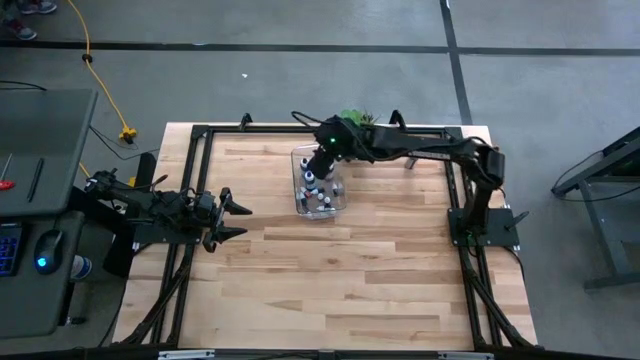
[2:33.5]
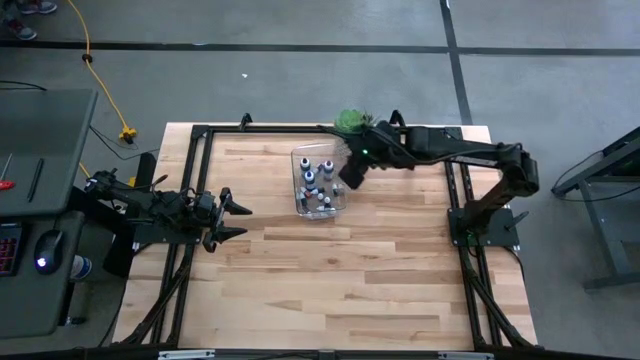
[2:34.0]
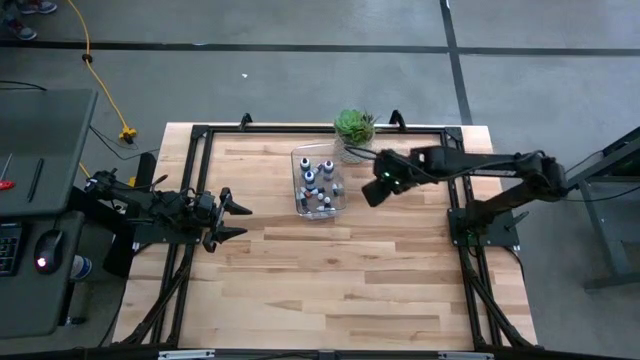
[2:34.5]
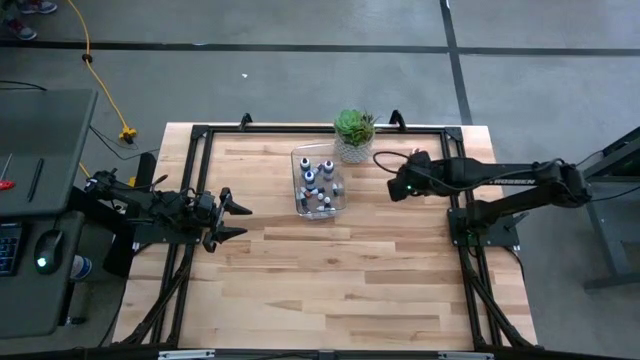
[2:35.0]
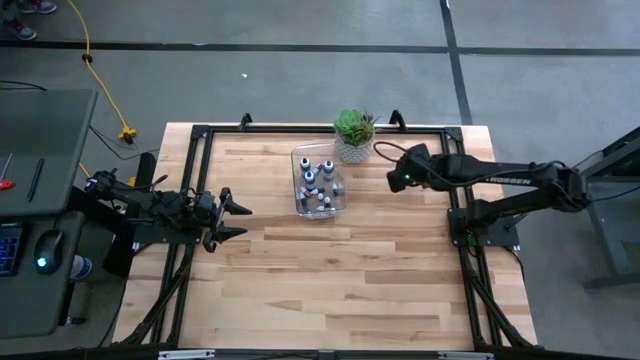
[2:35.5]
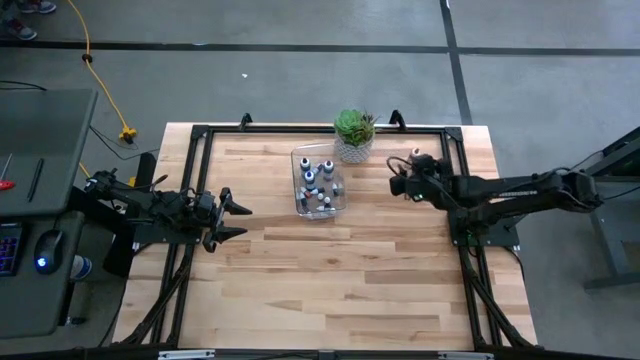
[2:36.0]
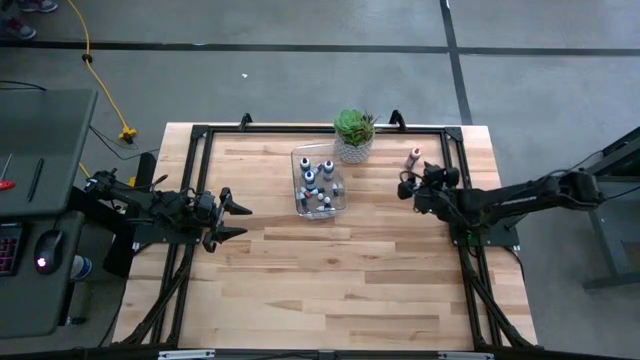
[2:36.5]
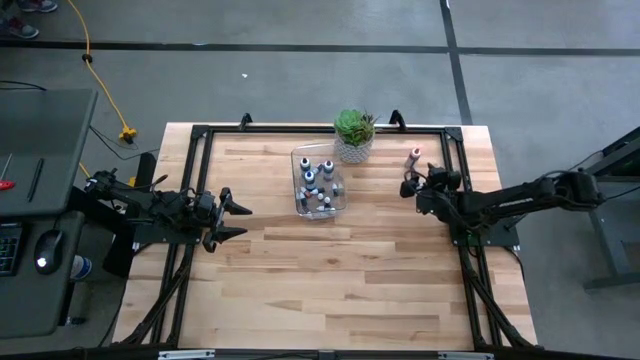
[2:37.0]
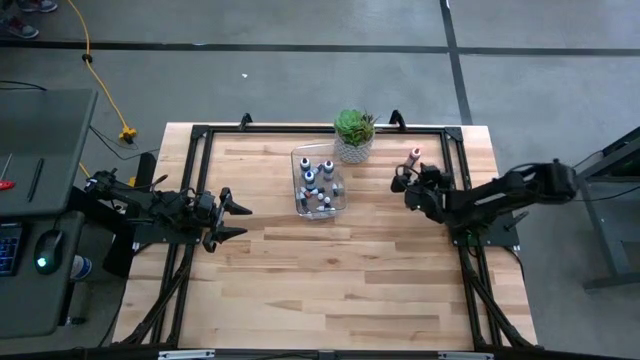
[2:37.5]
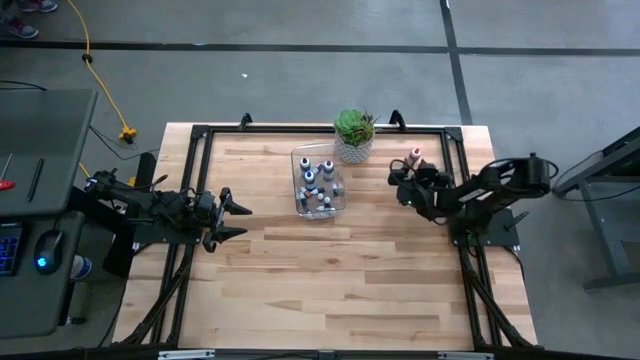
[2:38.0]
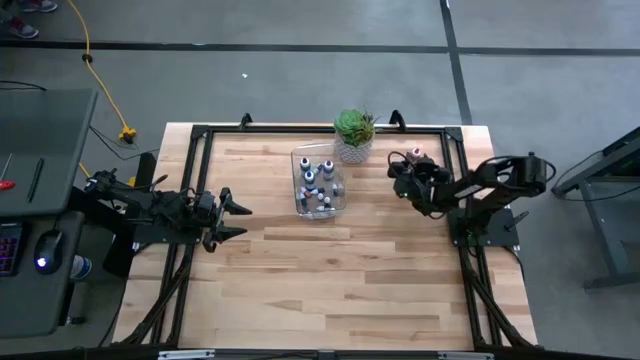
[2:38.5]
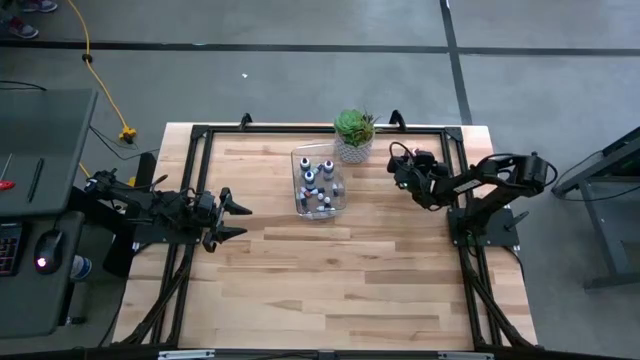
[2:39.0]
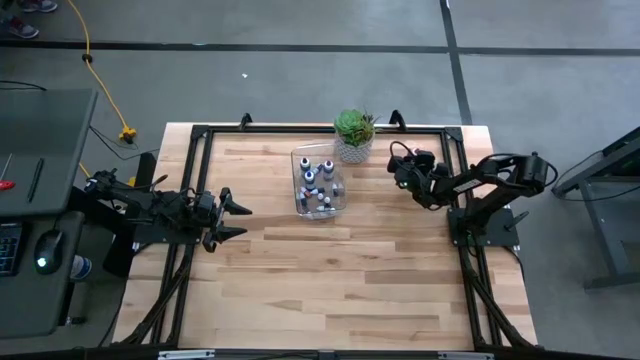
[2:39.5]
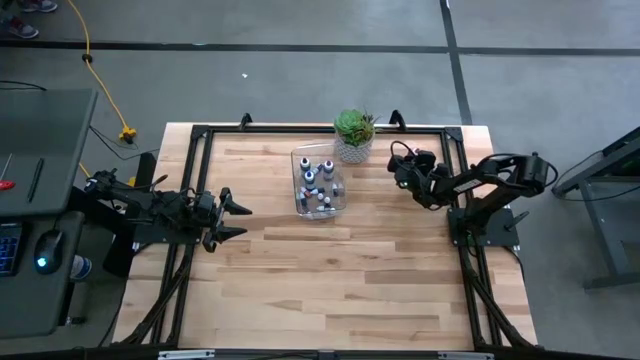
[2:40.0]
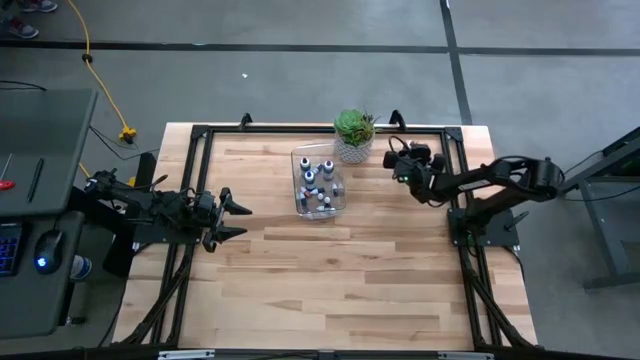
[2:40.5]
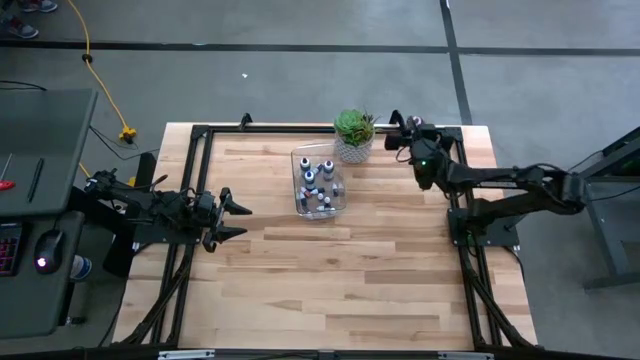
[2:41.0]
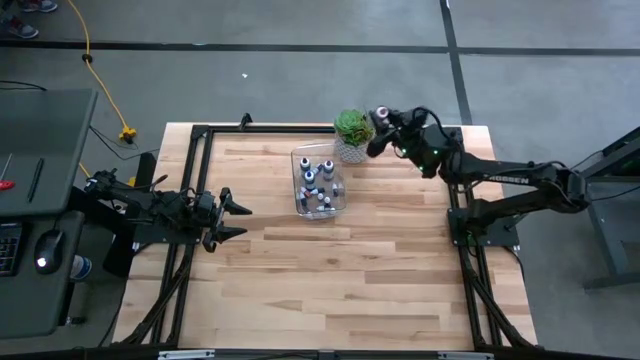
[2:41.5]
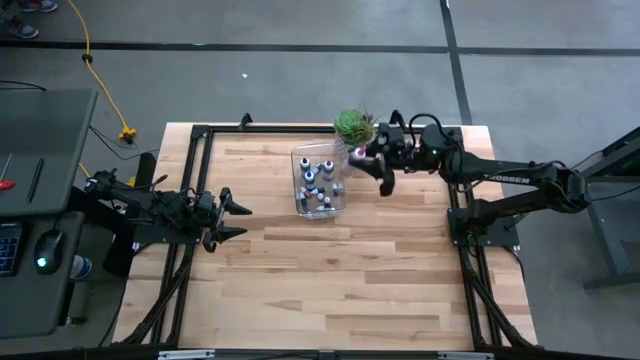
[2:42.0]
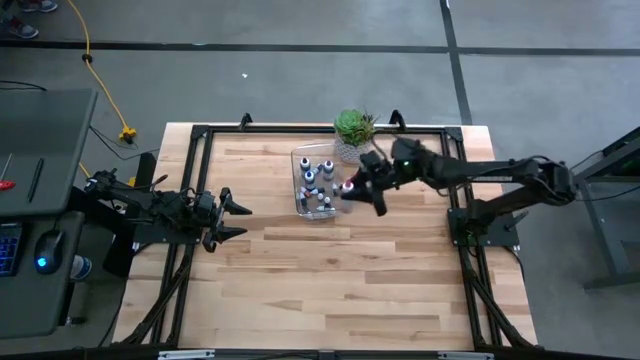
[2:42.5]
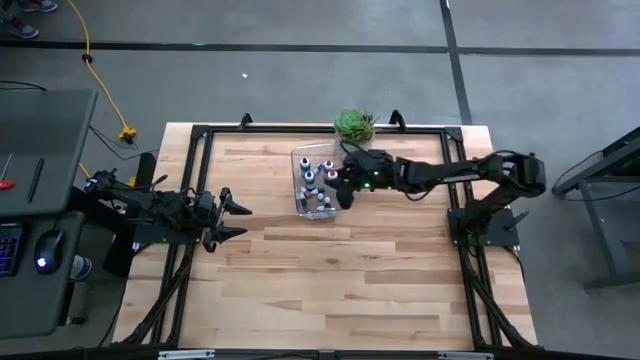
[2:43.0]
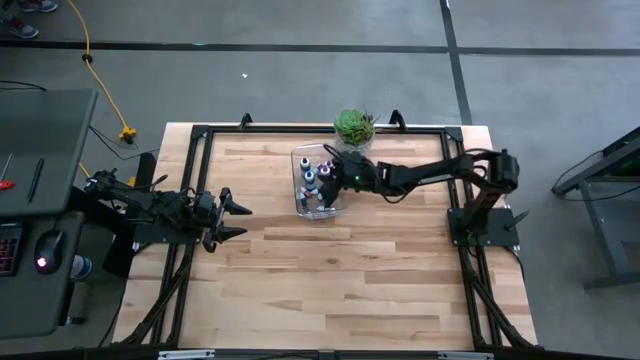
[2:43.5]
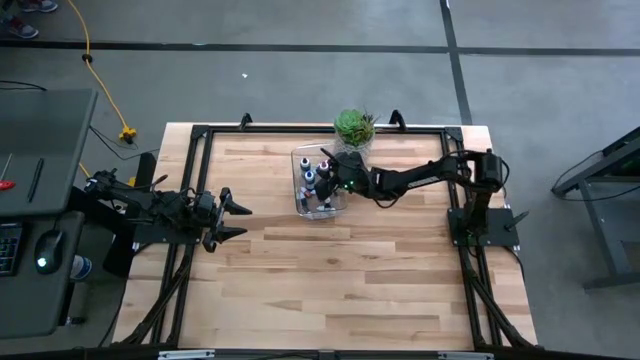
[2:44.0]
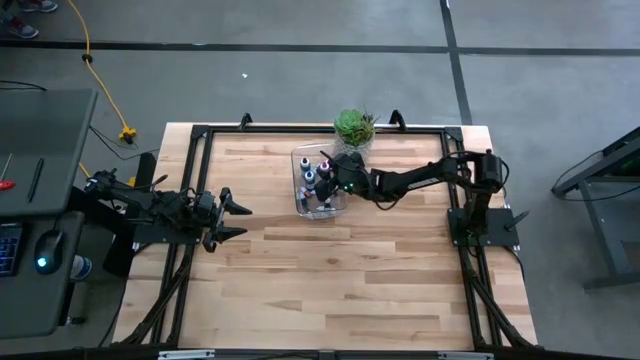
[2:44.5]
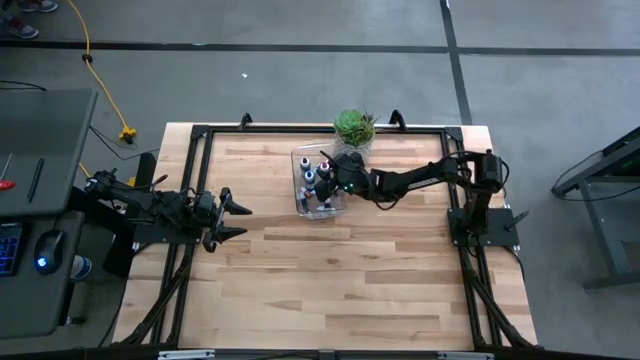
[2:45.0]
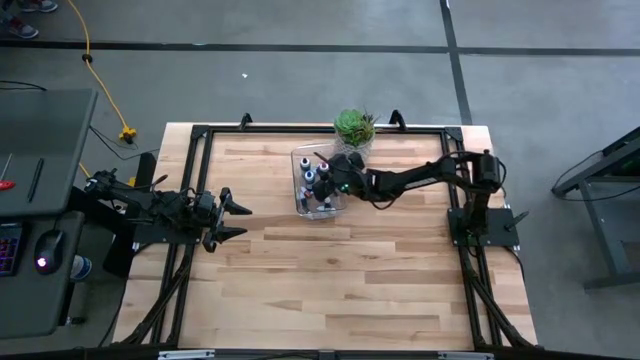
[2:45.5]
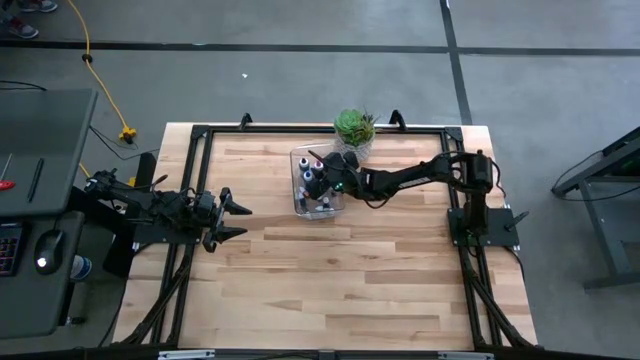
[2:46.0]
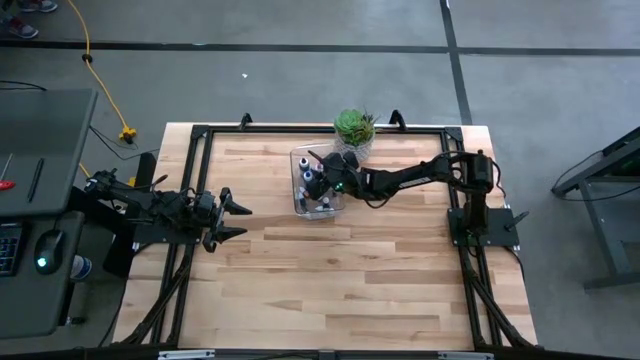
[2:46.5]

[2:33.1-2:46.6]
Task: Pick & Place food coloring
Put the big pink food coloring bottle into the transparent bin

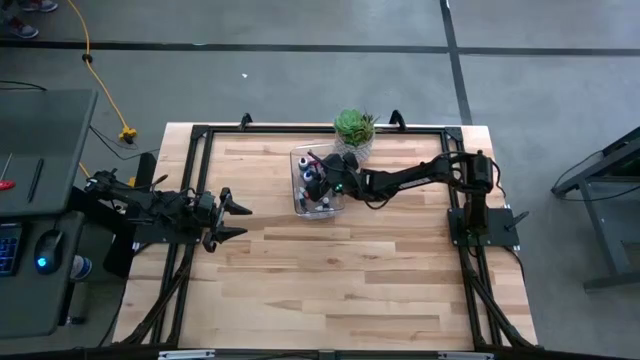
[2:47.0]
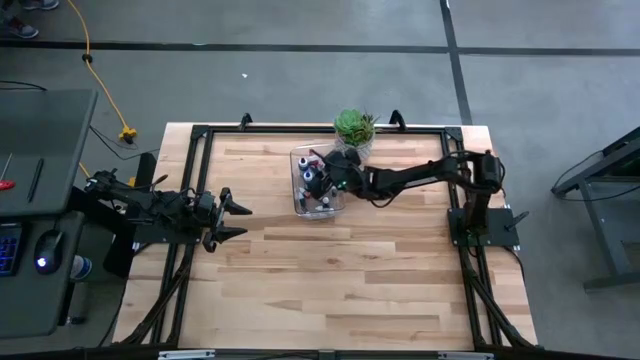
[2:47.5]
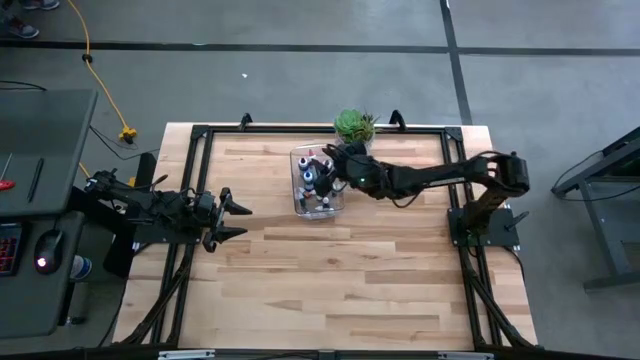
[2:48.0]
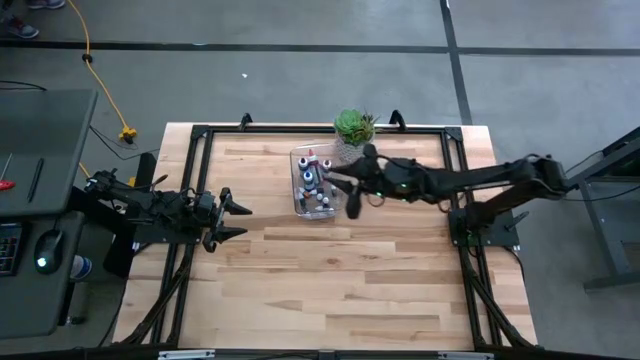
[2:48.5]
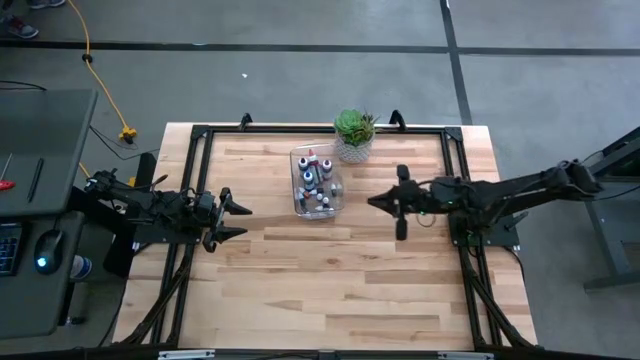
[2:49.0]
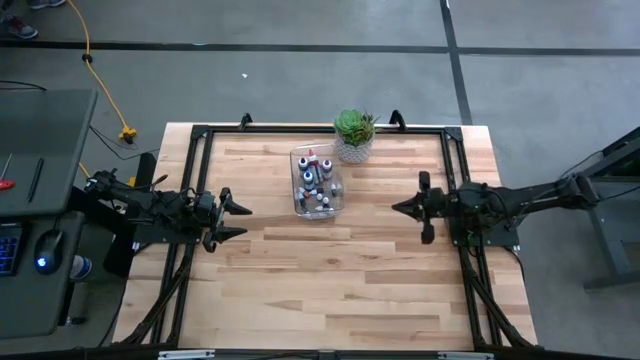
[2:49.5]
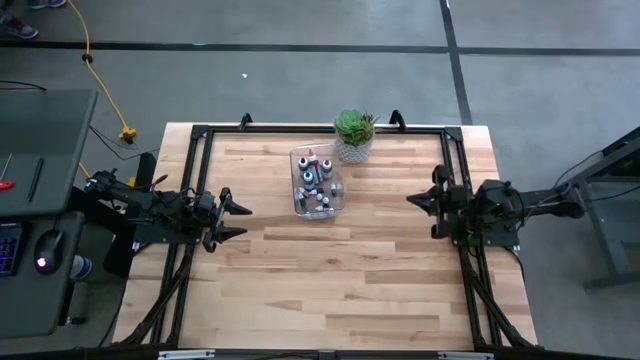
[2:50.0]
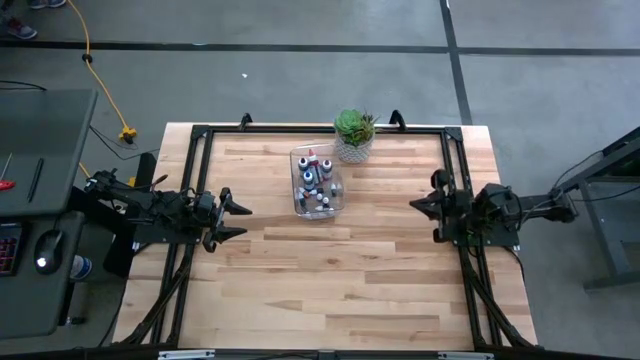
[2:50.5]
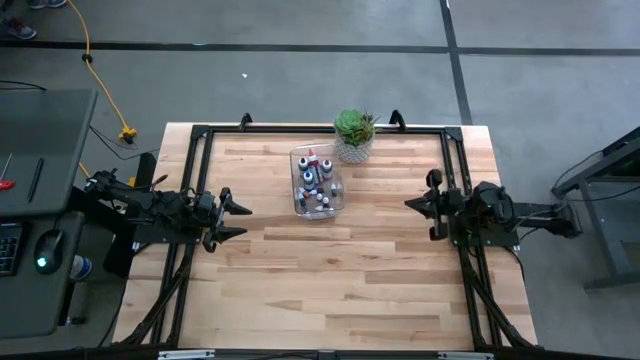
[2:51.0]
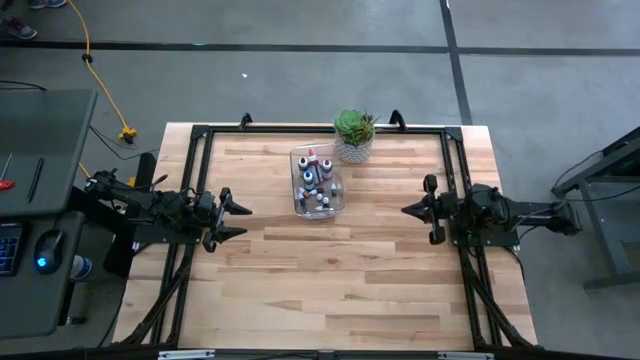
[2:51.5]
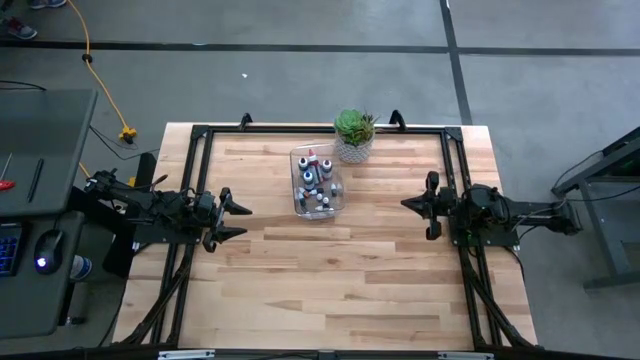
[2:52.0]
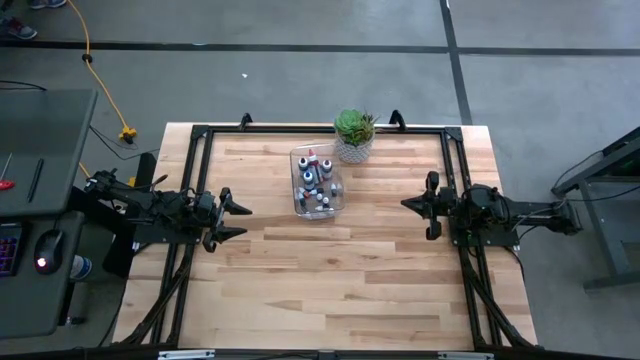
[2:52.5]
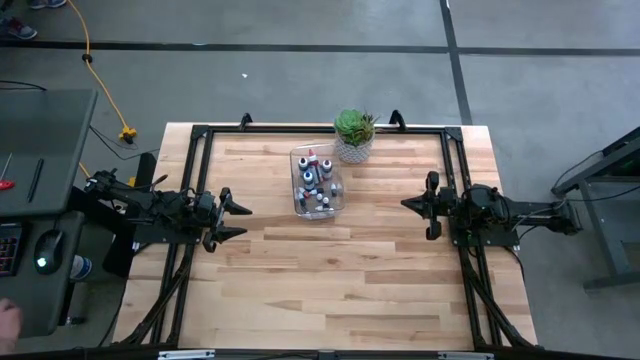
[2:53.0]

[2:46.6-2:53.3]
Return to Home Position
